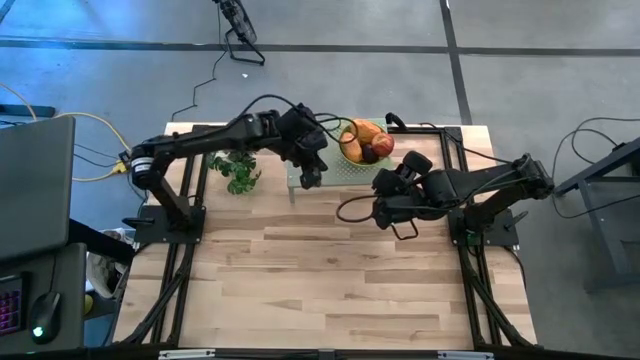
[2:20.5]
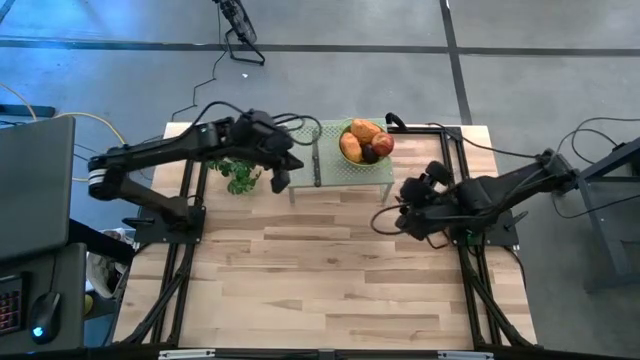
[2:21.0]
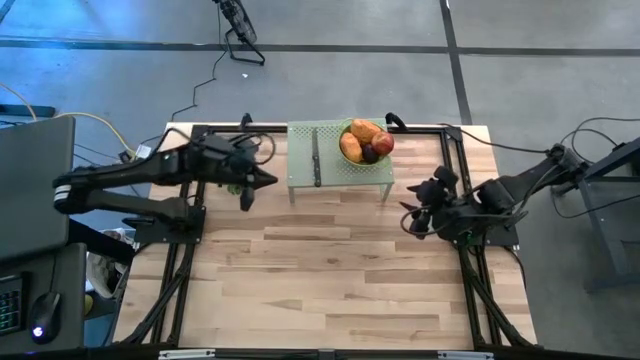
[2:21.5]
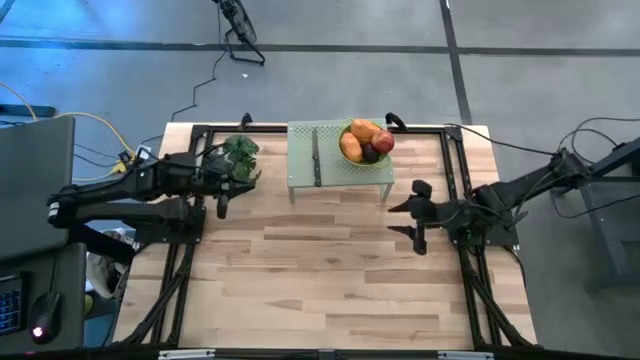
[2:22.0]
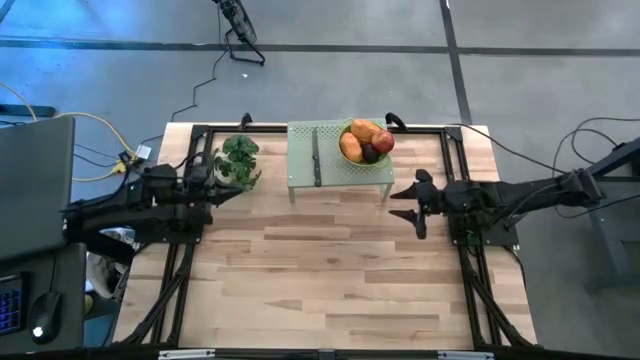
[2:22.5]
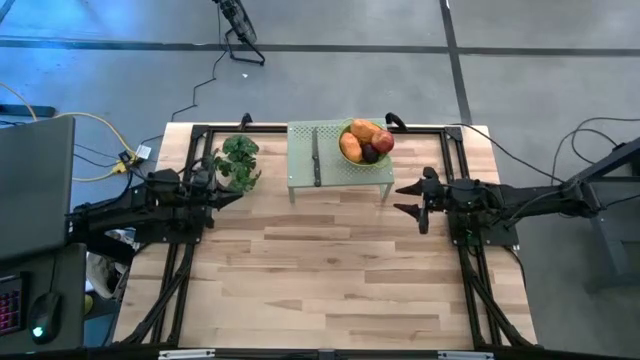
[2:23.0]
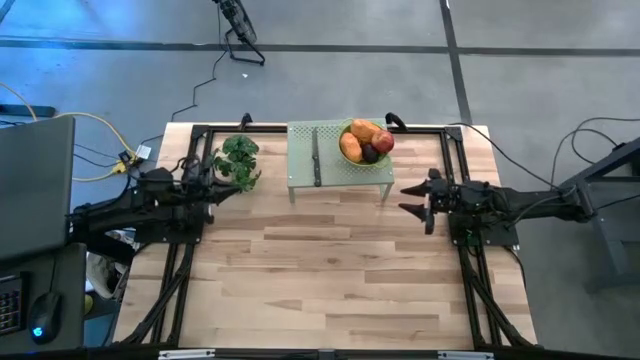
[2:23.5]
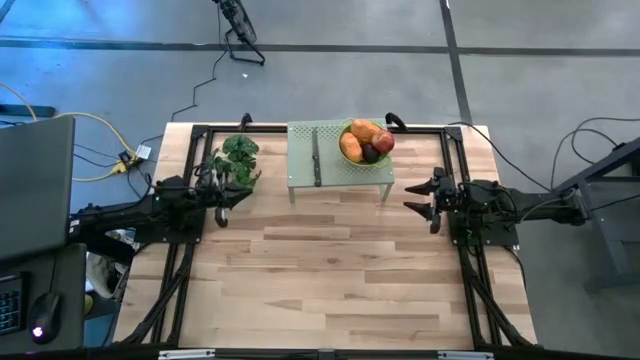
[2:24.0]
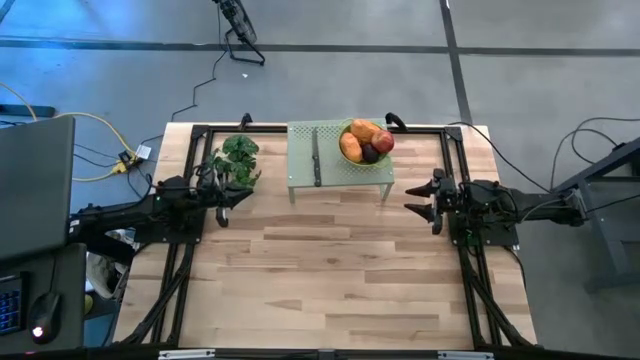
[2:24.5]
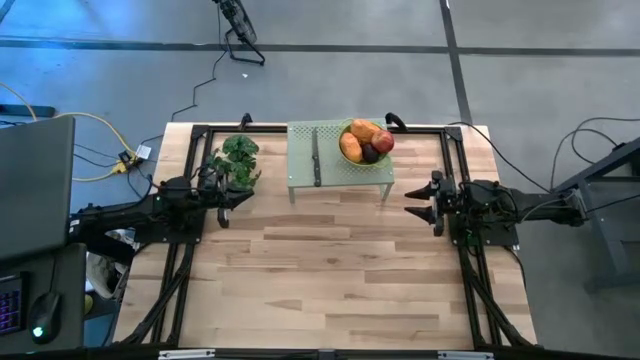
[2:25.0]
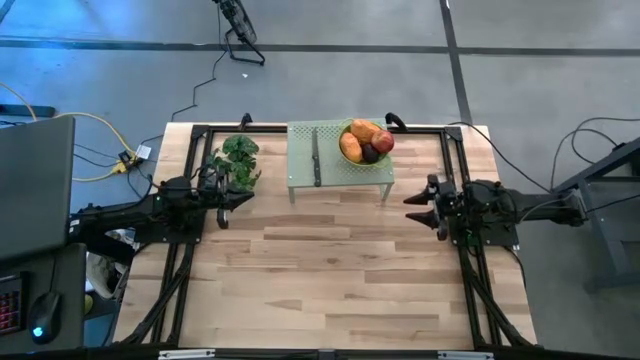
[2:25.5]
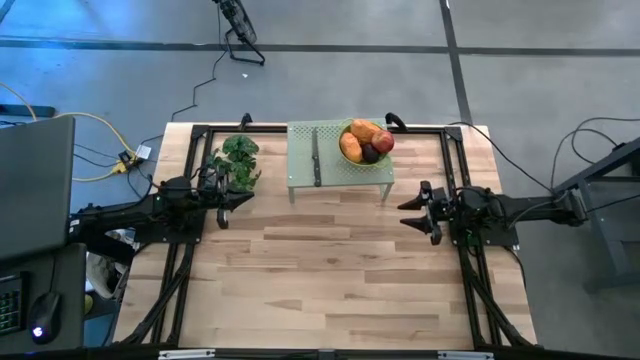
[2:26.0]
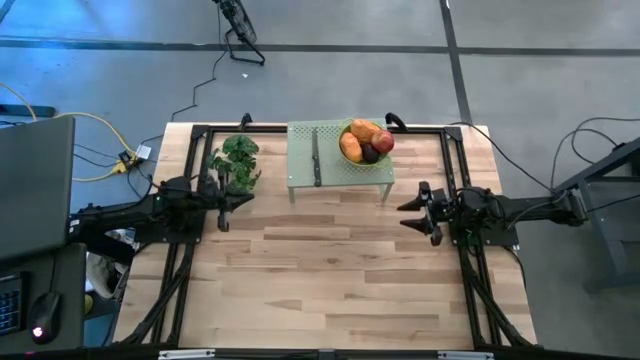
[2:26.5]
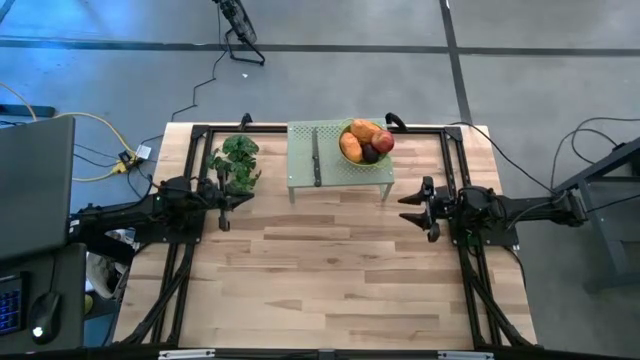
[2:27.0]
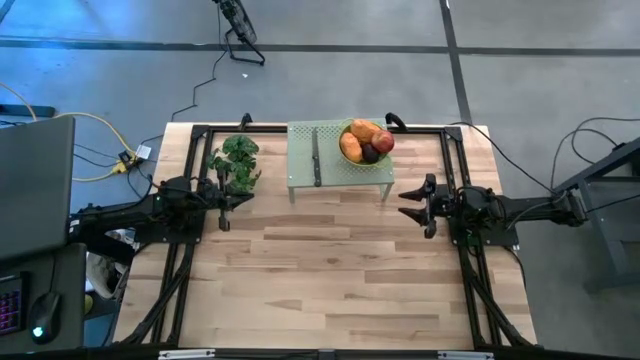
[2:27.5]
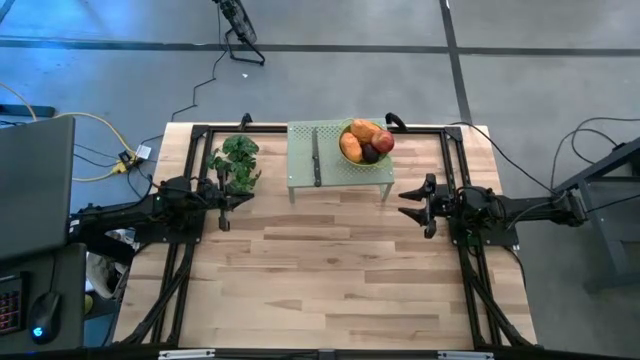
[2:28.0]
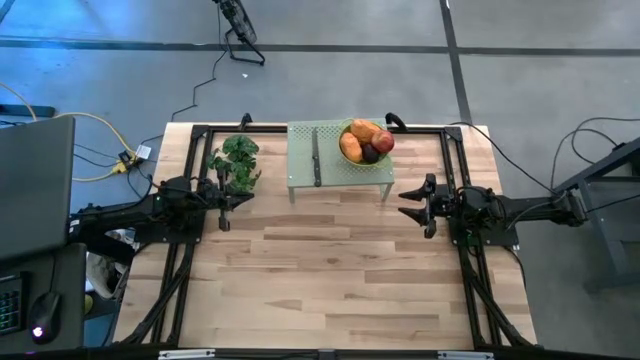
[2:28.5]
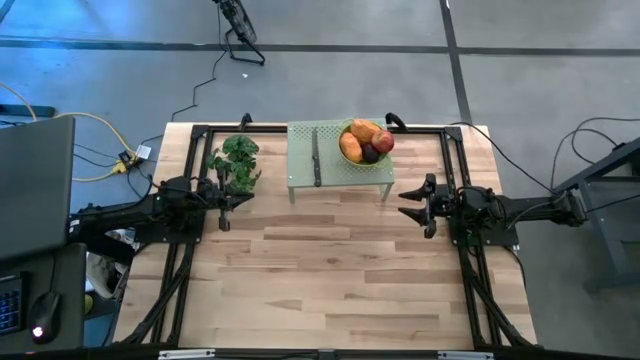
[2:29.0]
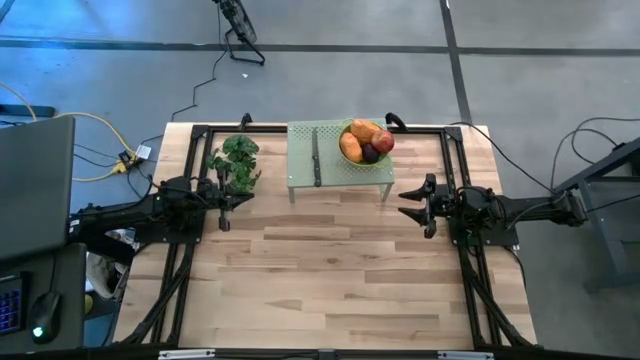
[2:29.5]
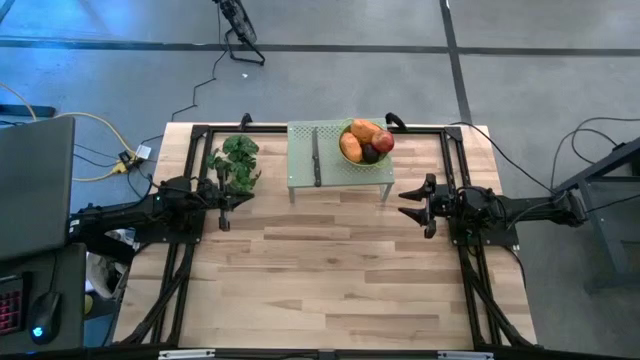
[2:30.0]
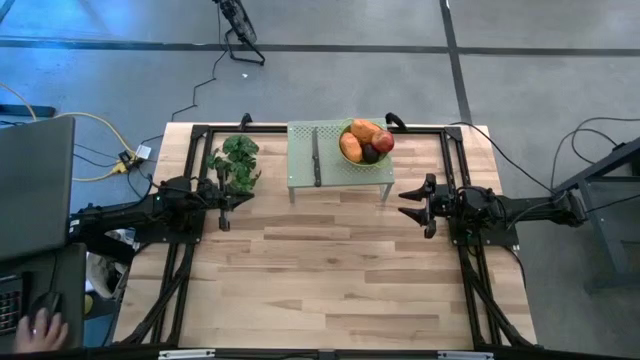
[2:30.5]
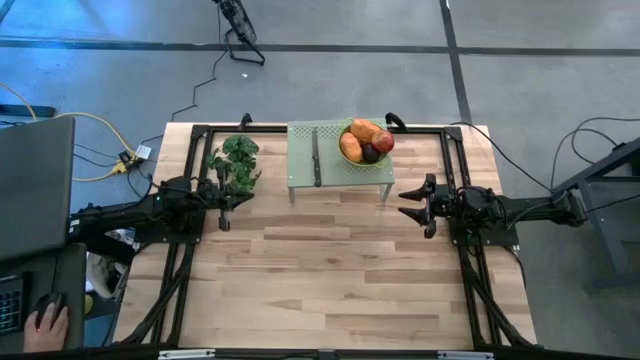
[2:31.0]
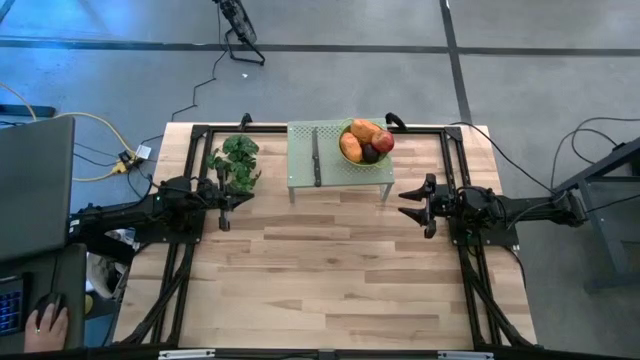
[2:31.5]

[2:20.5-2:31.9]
Task: Pick & Place Fruit
Return to Home Position

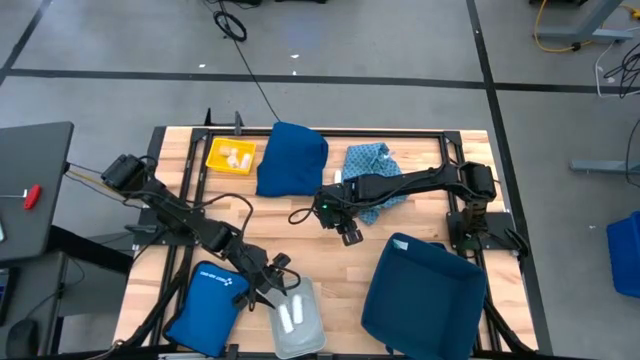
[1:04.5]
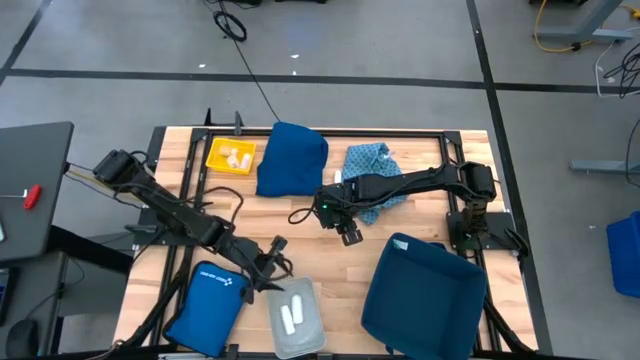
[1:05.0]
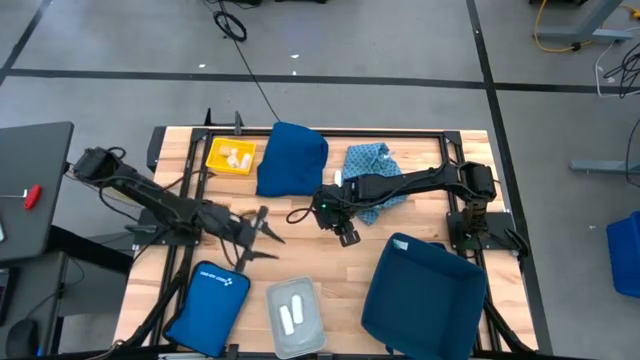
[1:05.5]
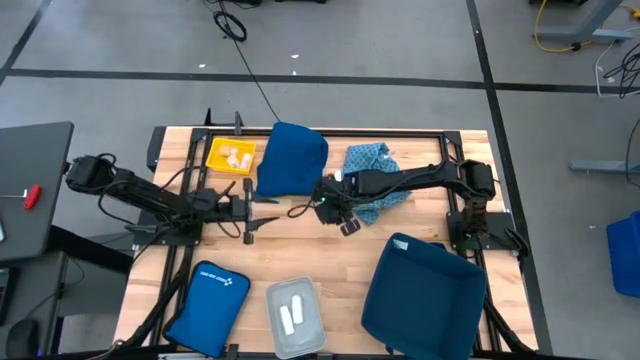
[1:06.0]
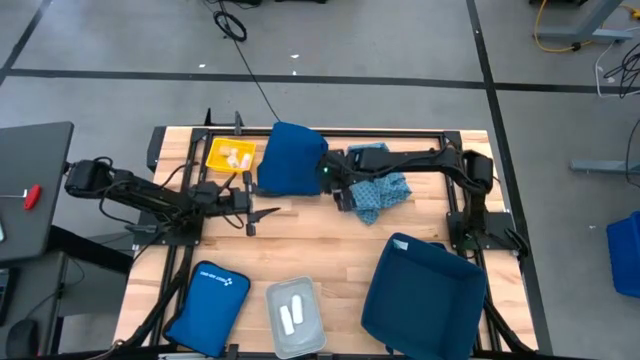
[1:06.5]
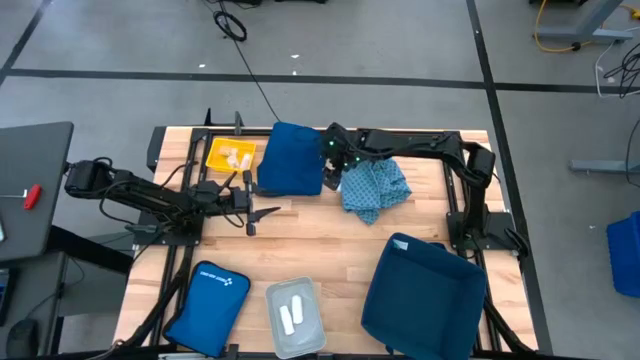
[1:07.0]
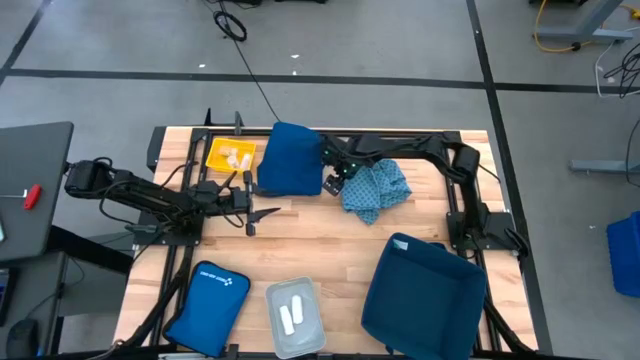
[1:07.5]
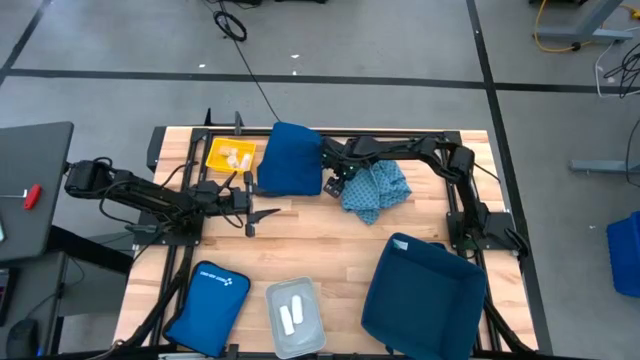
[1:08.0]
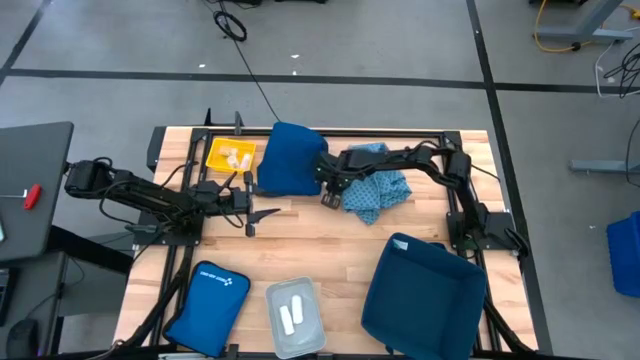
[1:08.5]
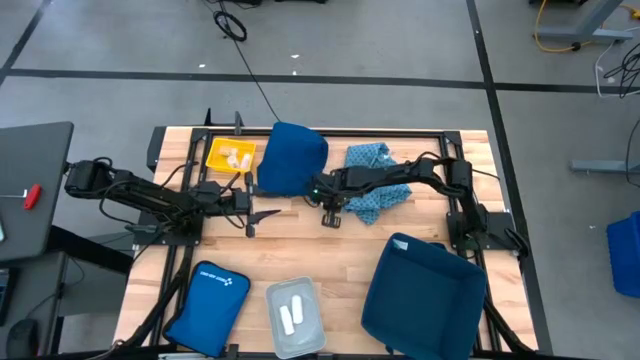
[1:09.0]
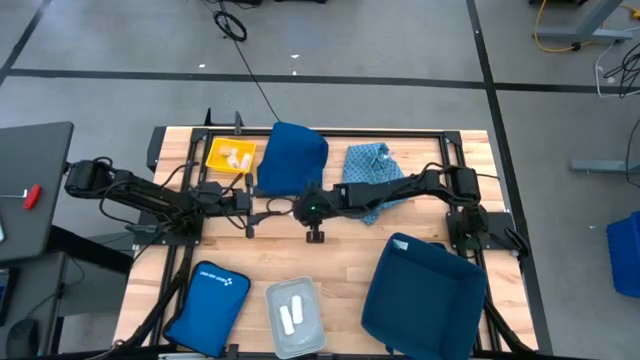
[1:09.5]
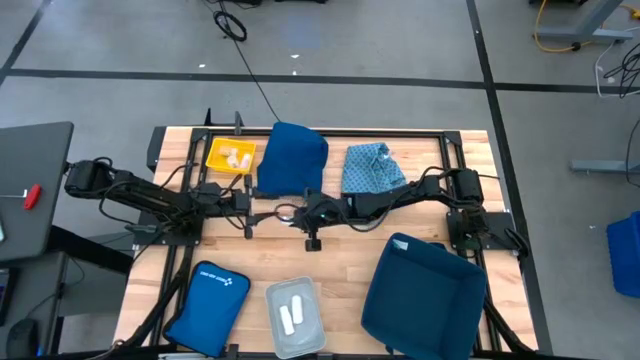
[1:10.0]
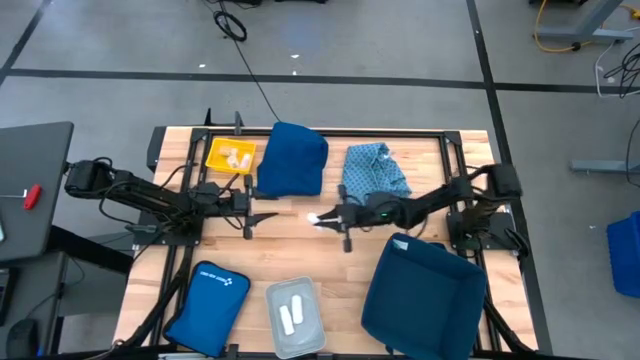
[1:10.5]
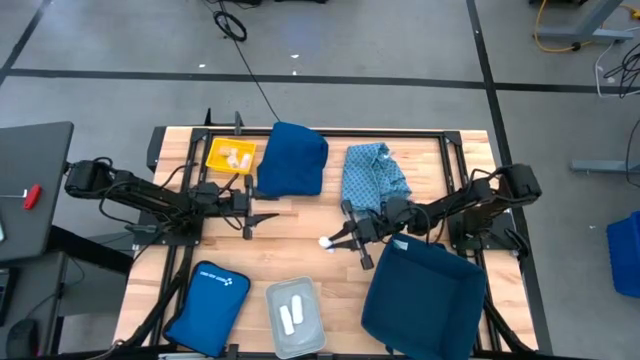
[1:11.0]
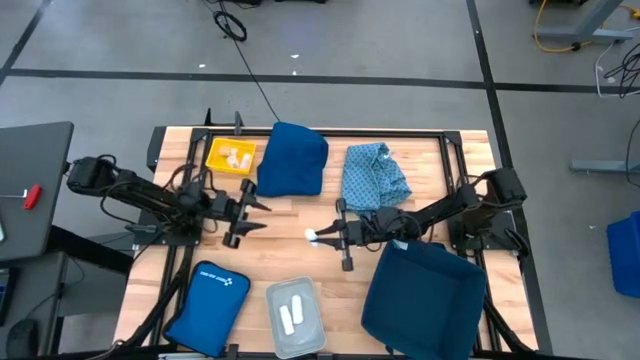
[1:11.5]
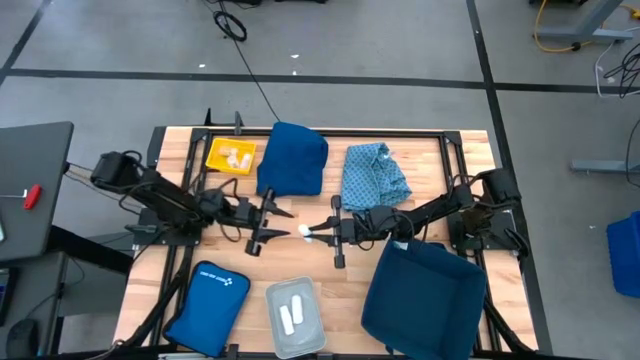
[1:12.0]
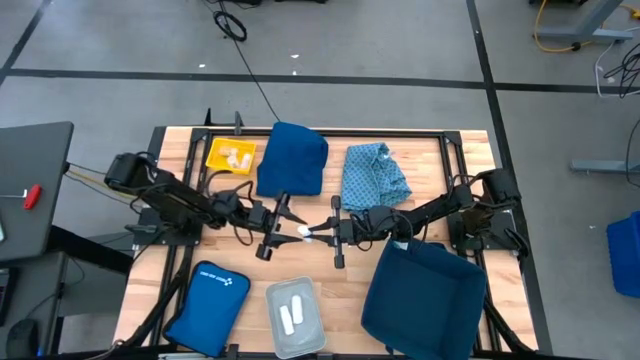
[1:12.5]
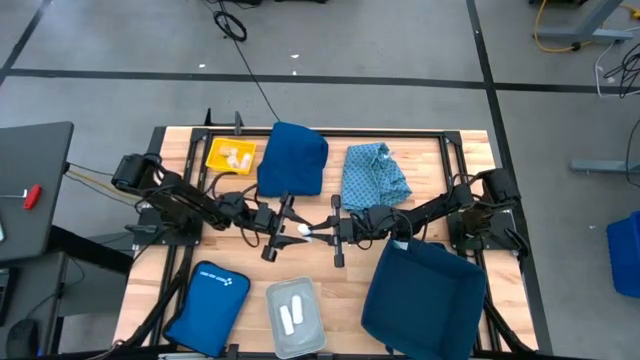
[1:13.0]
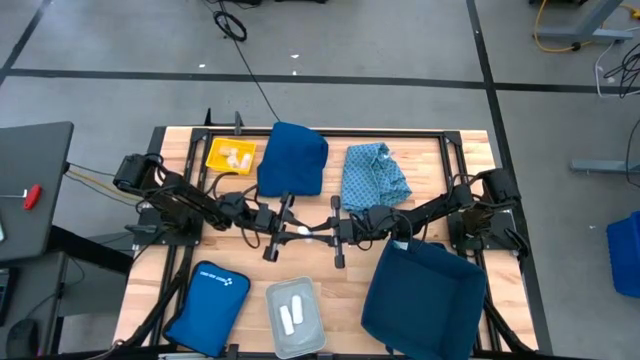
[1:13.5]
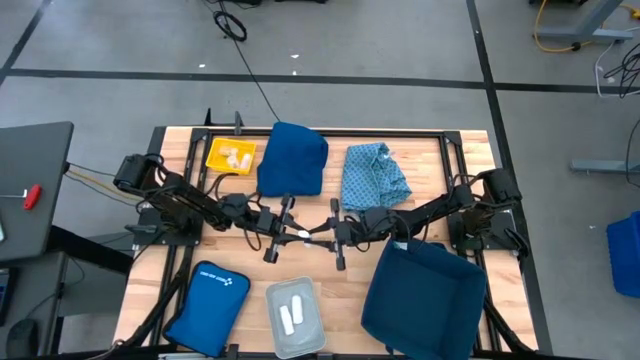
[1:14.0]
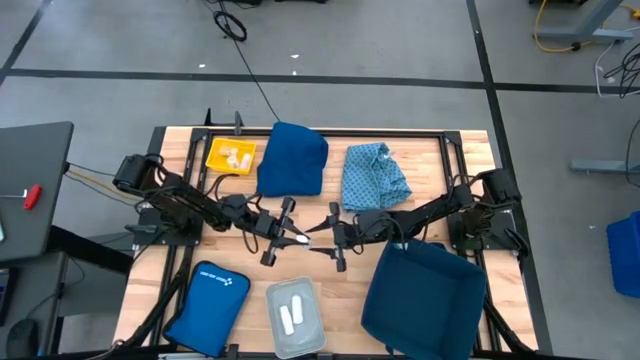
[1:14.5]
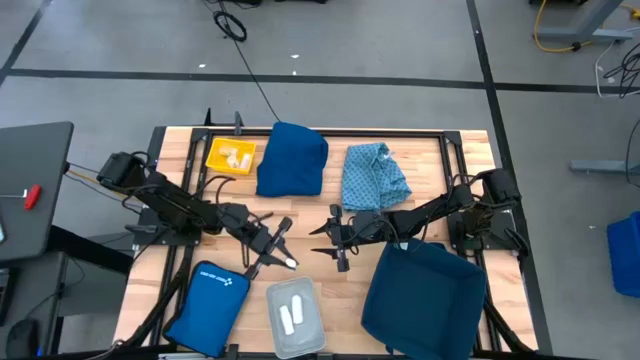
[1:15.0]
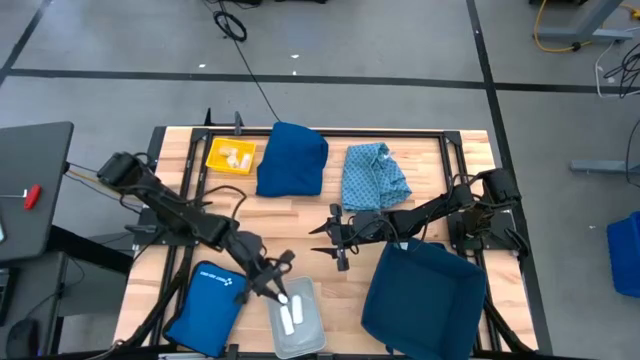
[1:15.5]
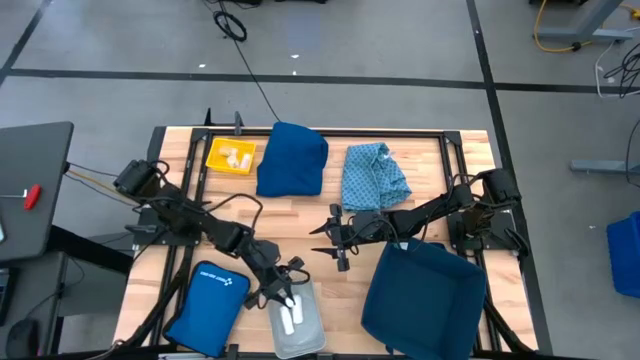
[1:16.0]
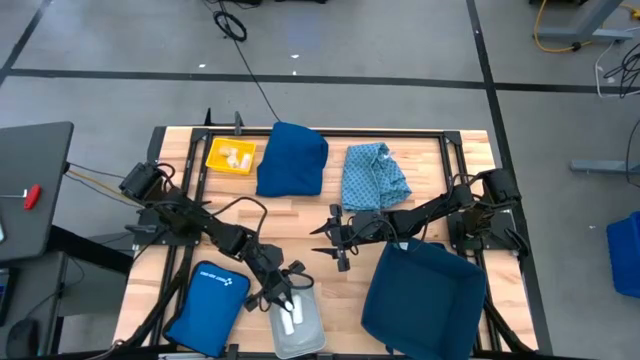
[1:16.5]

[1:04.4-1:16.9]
Task: Pick & place medical supplies in basket/bin
Put the white bandage into the gray bin
